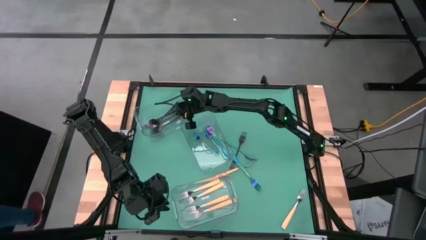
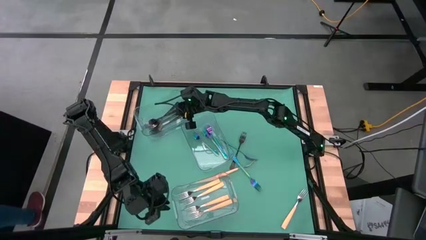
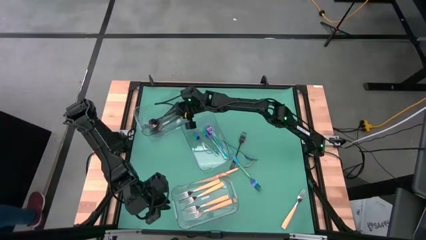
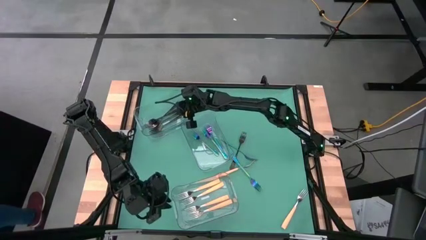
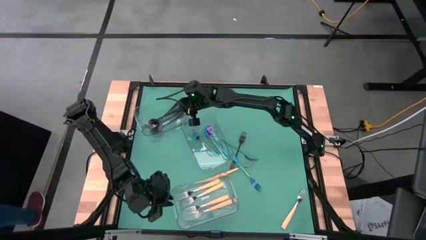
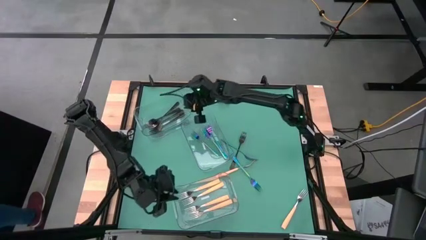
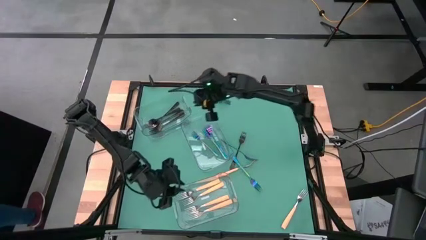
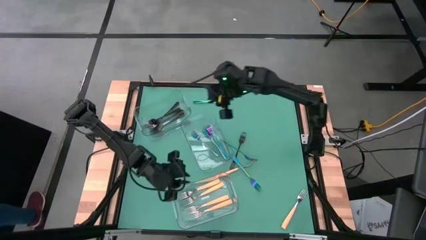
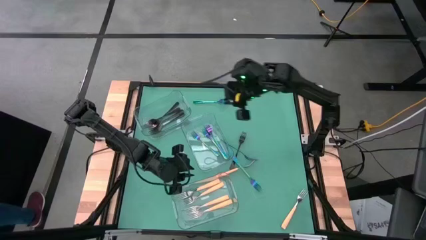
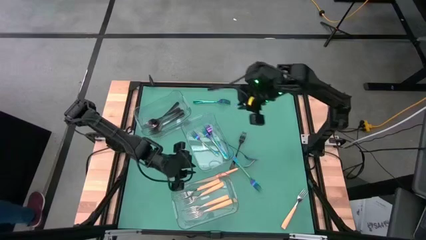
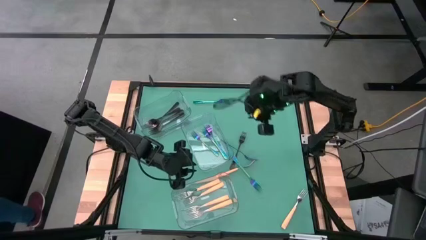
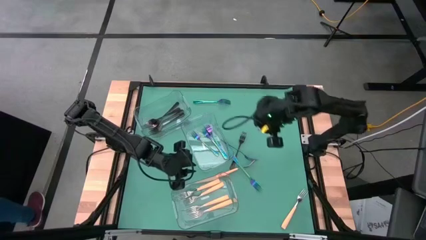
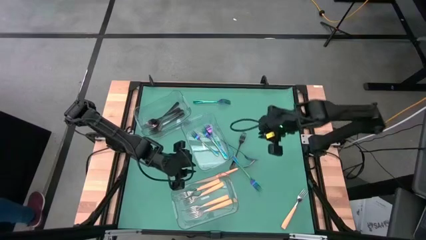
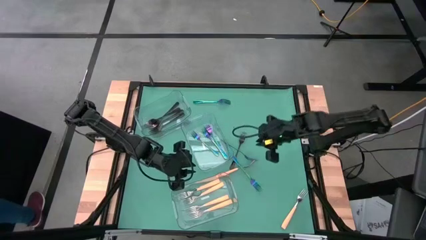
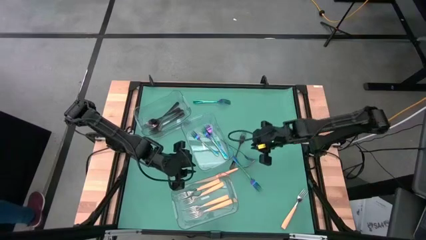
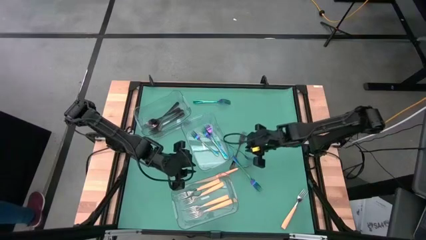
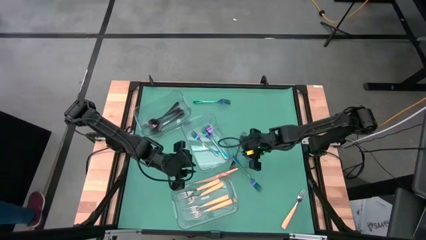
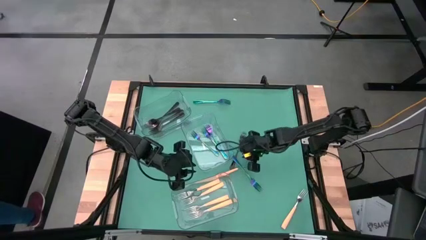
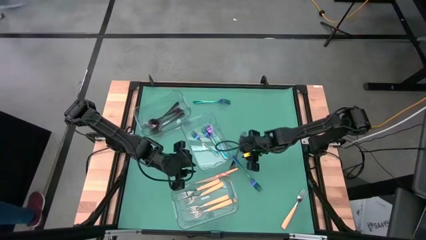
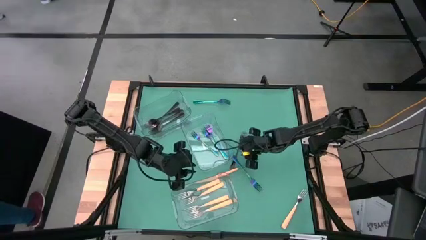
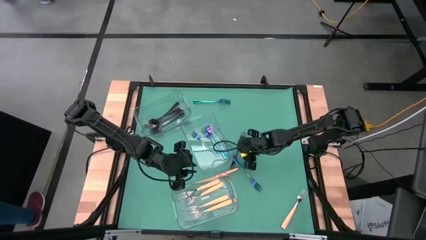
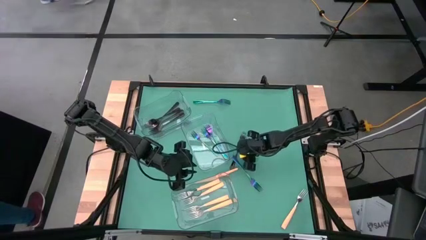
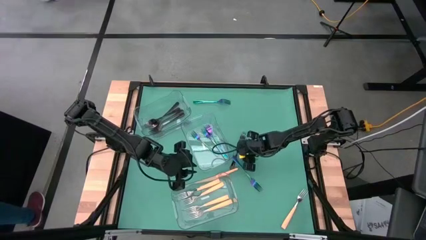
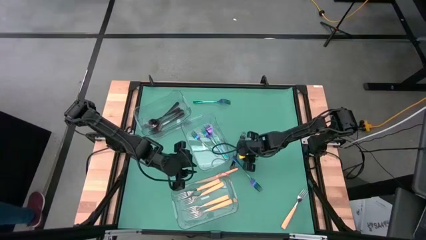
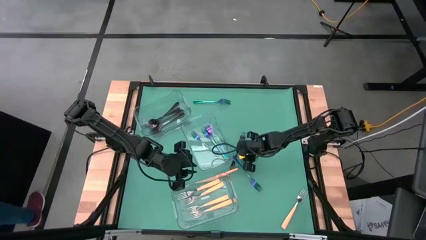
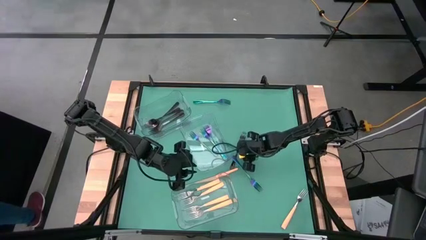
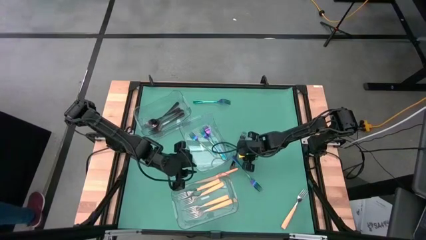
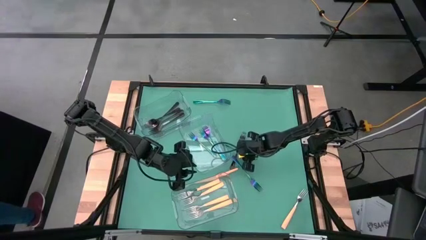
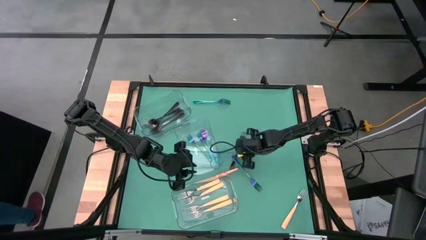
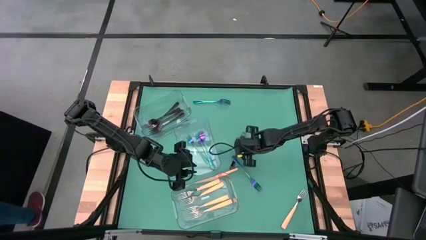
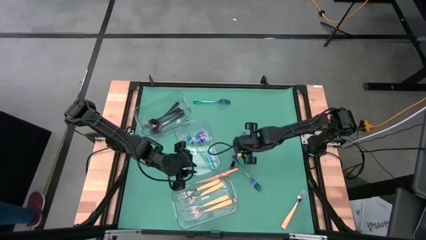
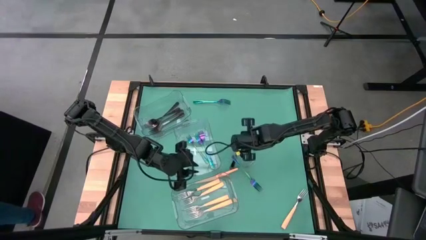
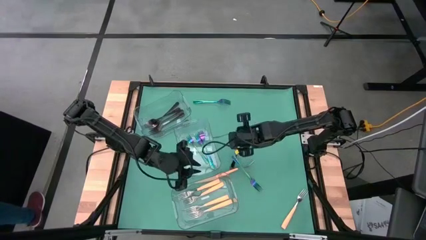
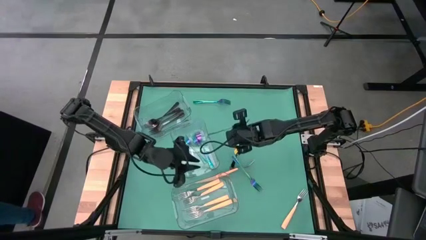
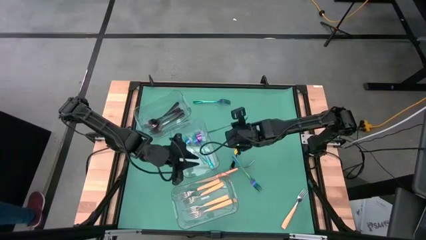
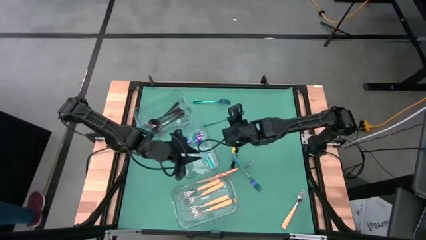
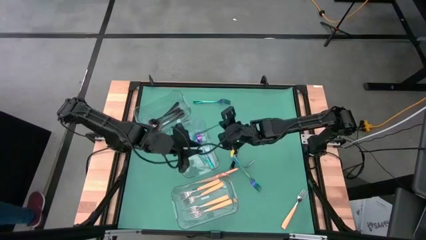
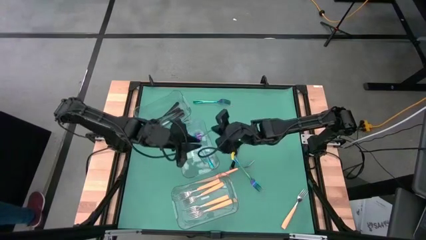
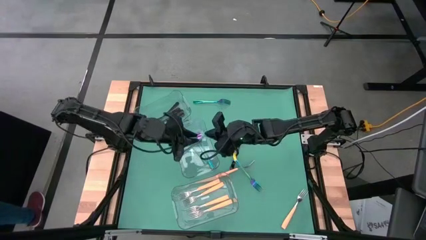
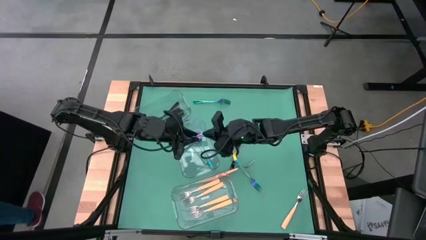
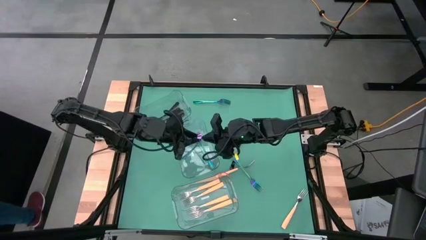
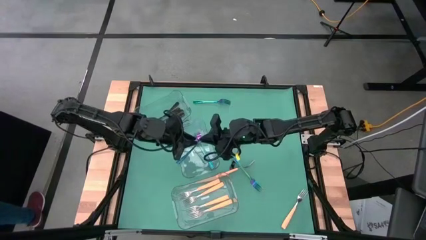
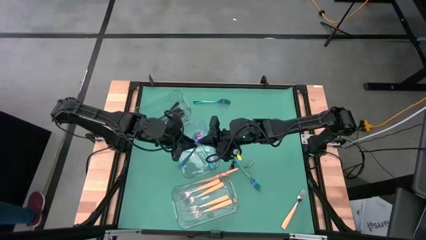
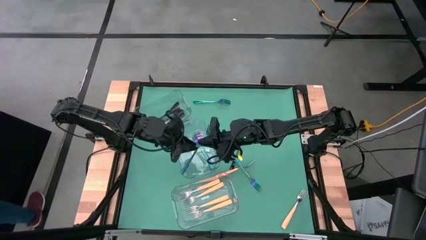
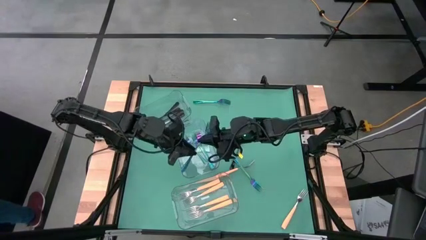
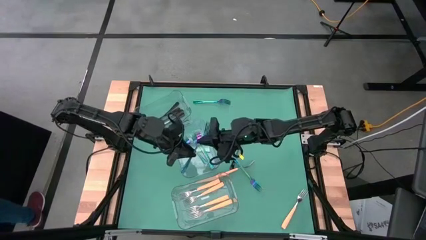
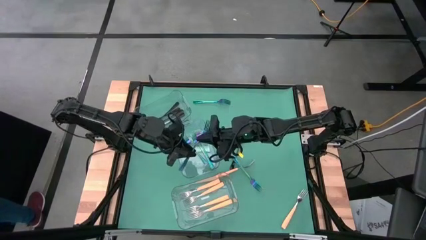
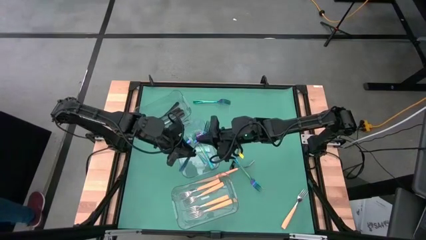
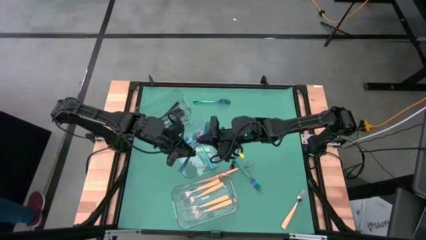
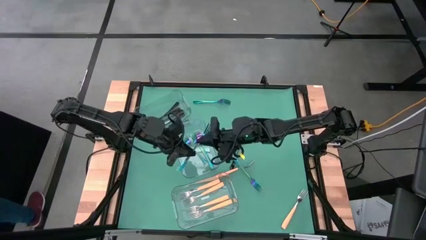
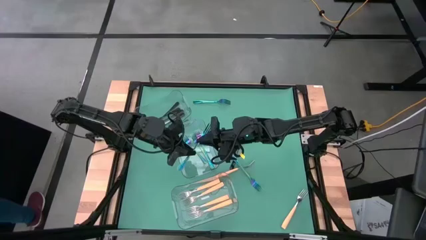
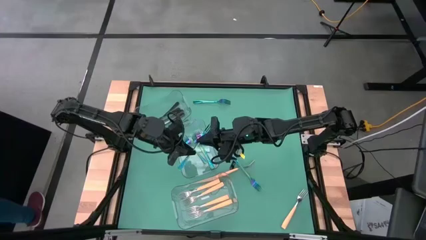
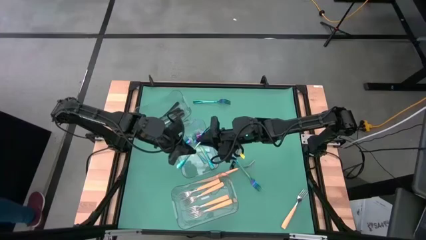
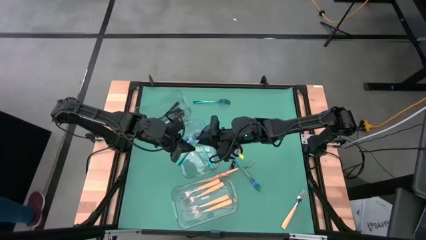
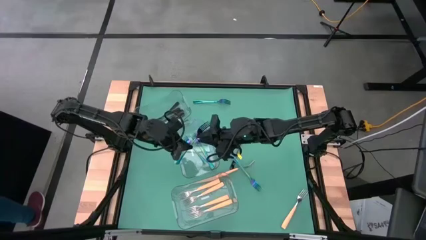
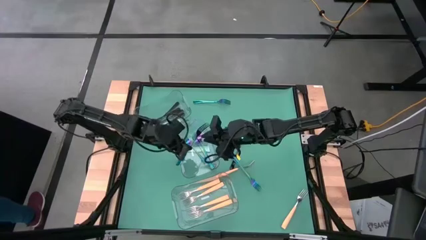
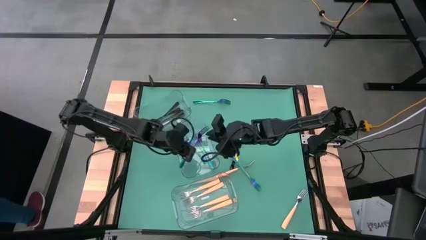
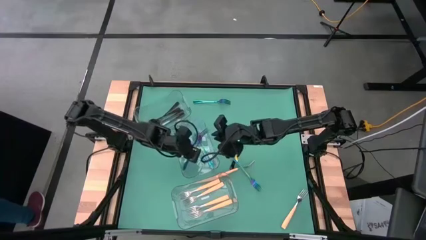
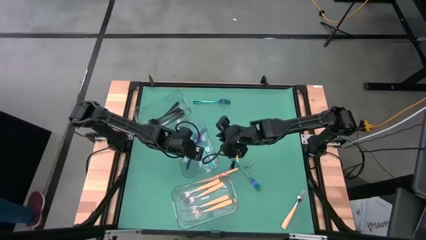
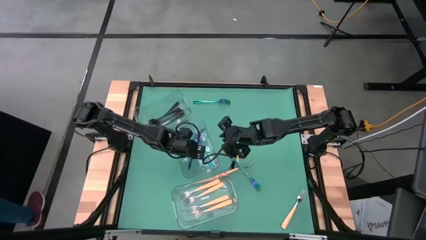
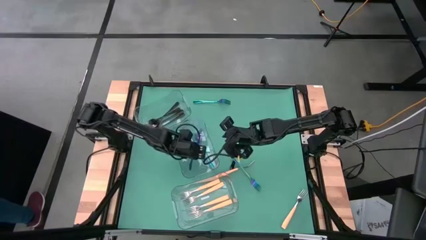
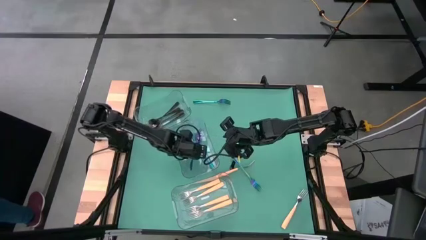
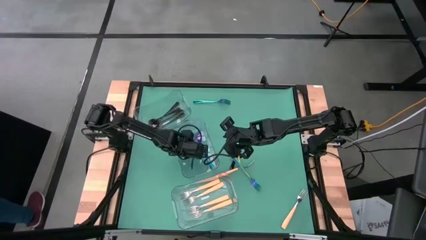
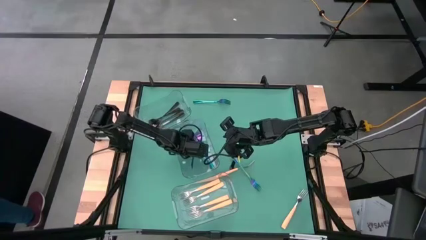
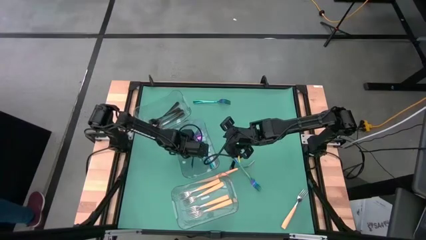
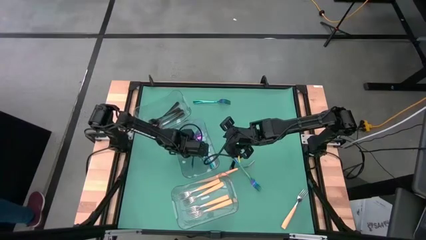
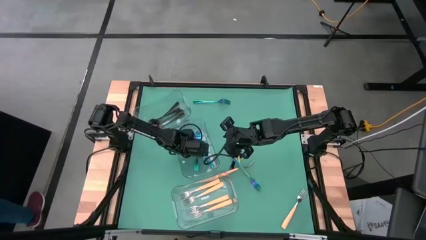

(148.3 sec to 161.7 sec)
Task: Sort silverware by color (type)
Put the blue fork into the center transparent bin

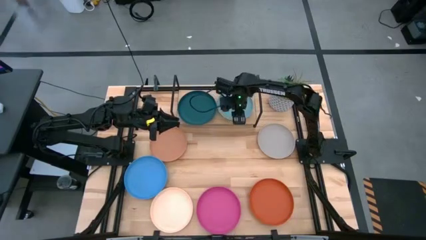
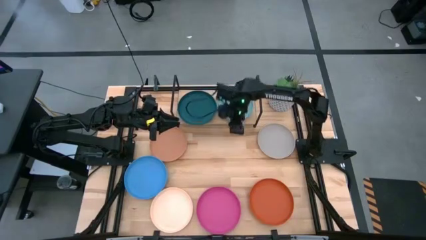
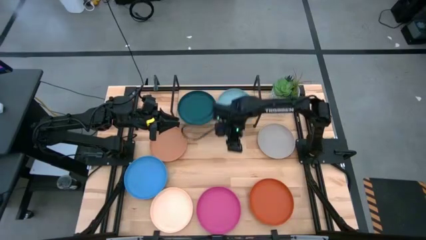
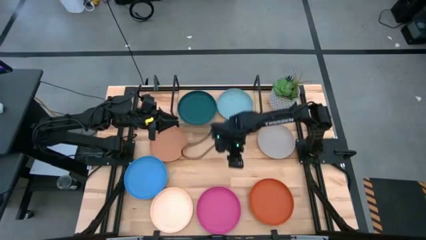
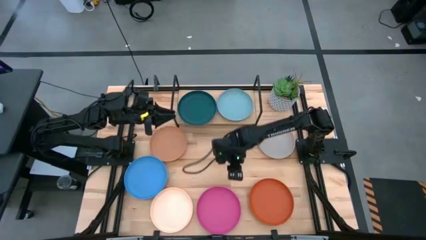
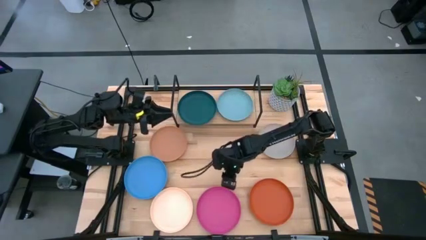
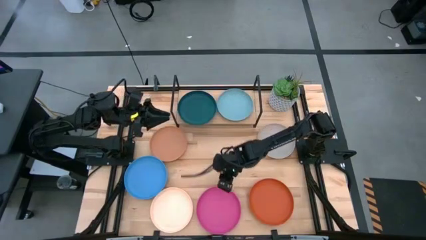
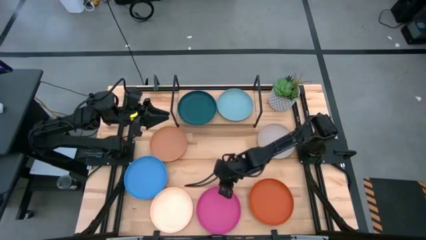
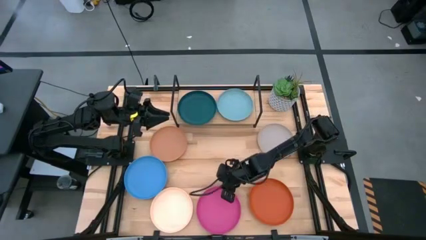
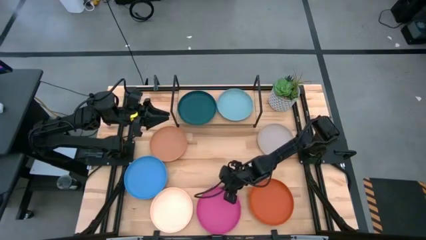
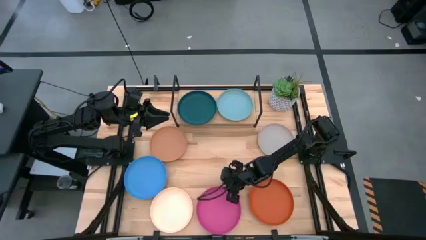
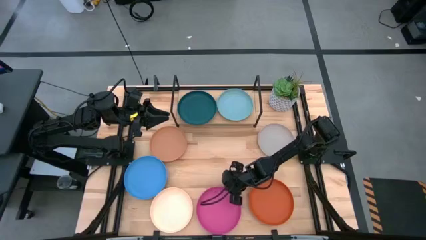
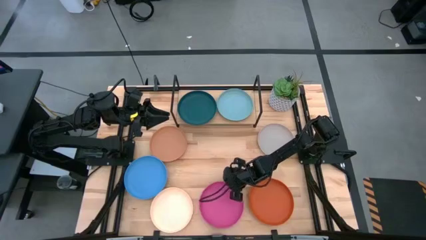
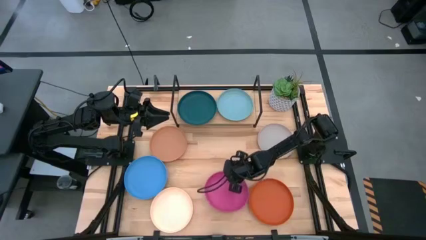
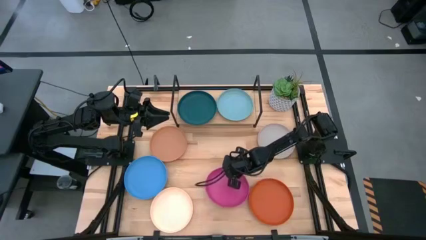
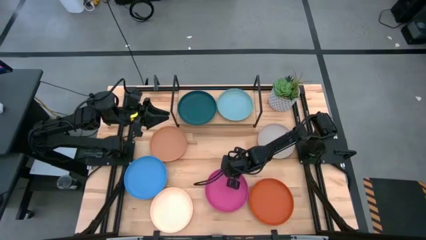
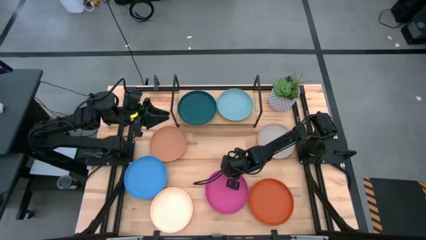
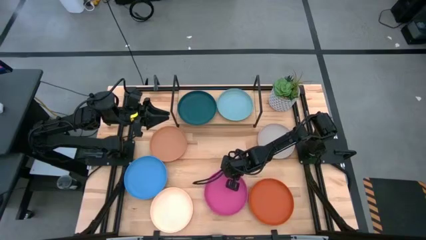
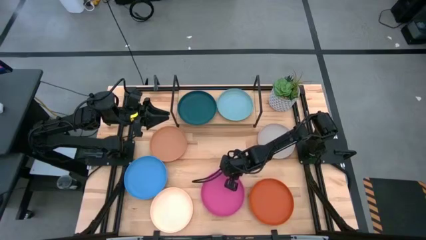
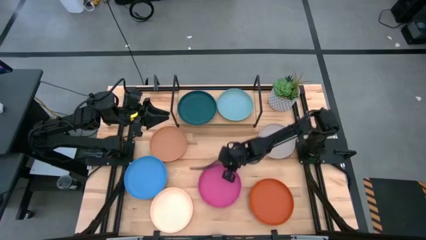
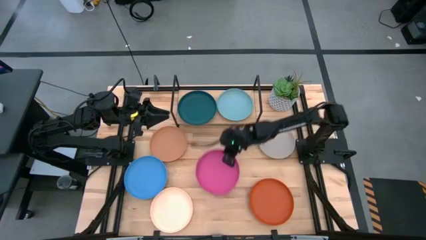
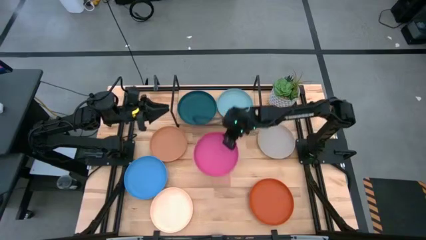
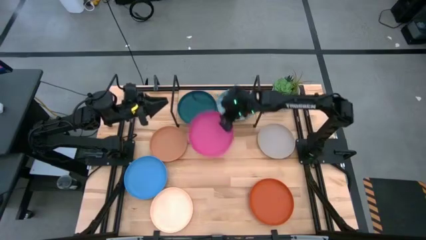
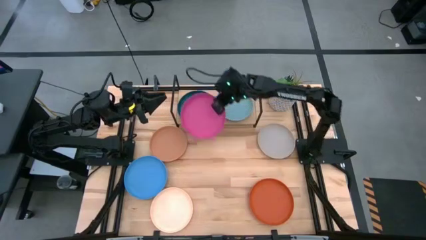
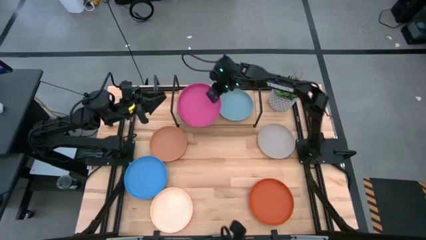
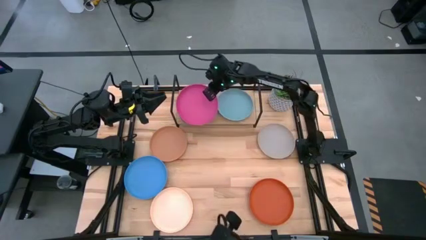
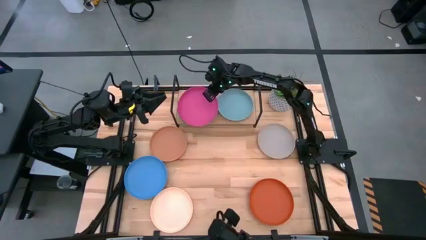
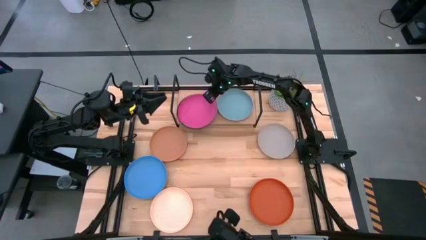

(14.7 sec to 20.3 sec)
Task: Place and stack plates onto a shelf
Stack the pink plate on top of the dark blue plate on the shelf
